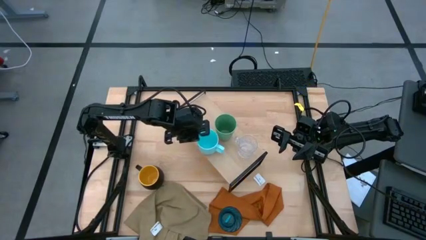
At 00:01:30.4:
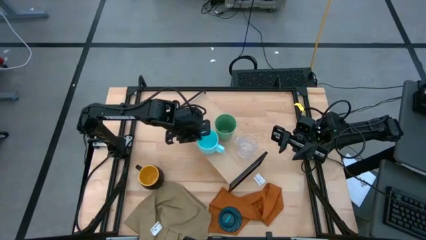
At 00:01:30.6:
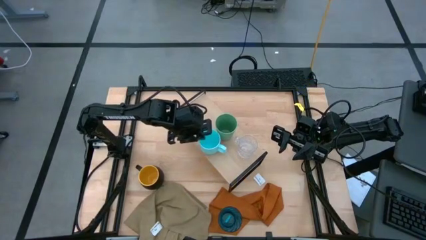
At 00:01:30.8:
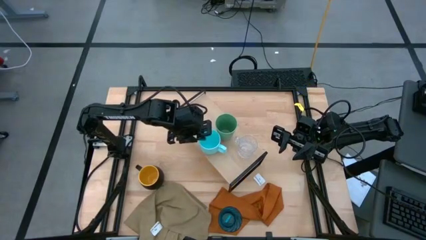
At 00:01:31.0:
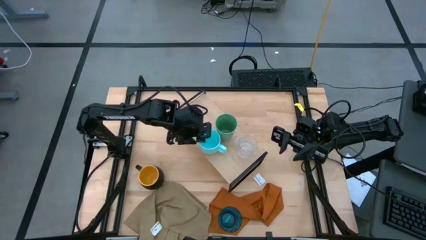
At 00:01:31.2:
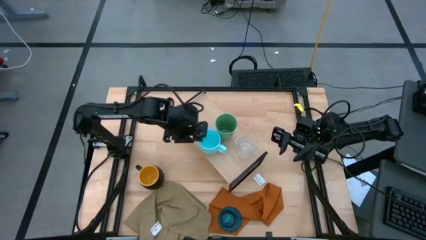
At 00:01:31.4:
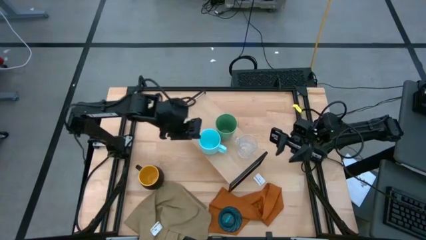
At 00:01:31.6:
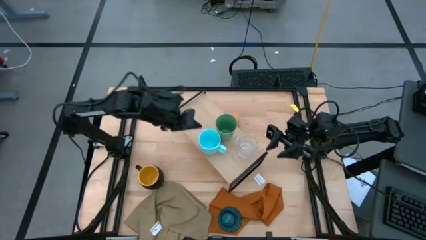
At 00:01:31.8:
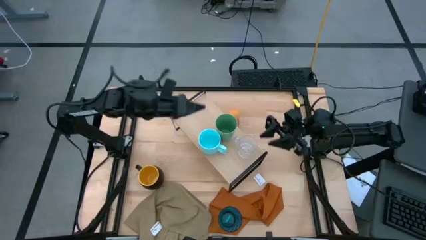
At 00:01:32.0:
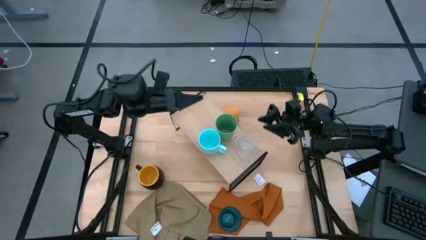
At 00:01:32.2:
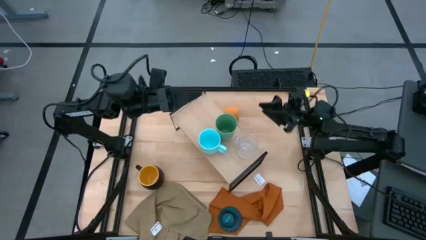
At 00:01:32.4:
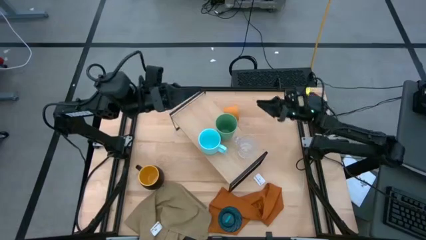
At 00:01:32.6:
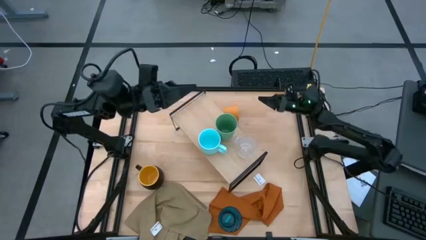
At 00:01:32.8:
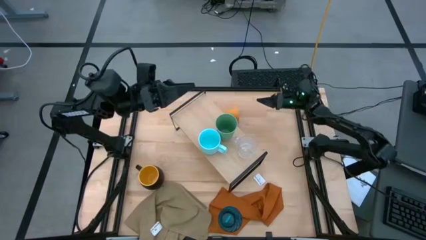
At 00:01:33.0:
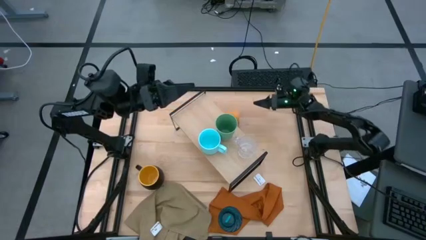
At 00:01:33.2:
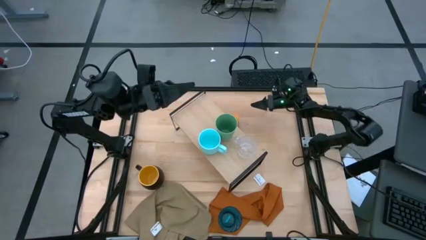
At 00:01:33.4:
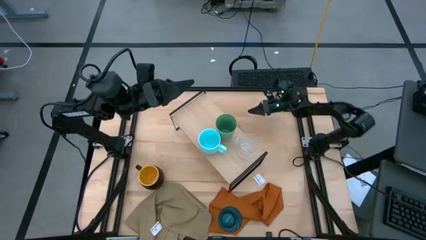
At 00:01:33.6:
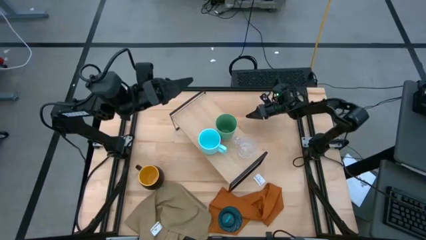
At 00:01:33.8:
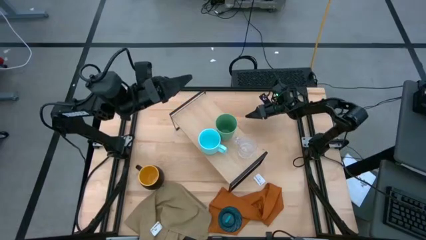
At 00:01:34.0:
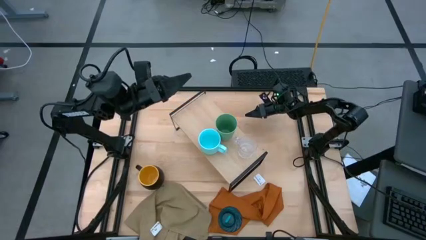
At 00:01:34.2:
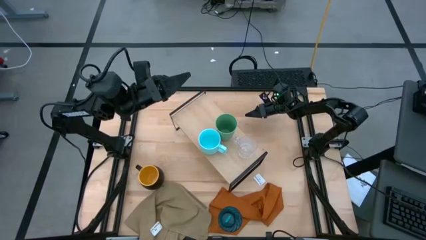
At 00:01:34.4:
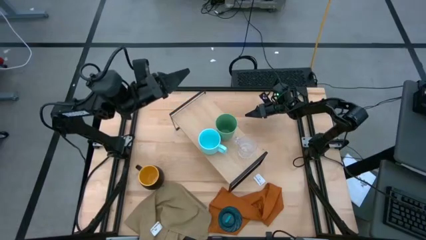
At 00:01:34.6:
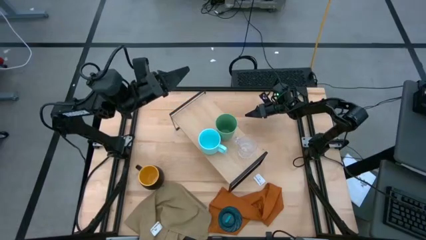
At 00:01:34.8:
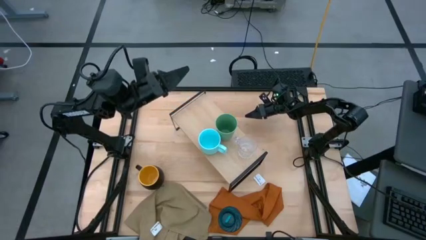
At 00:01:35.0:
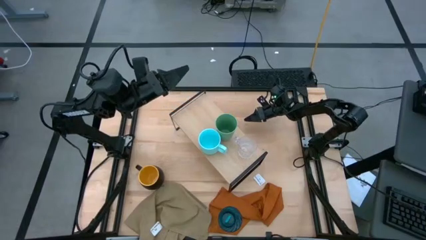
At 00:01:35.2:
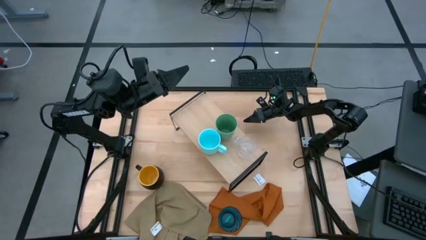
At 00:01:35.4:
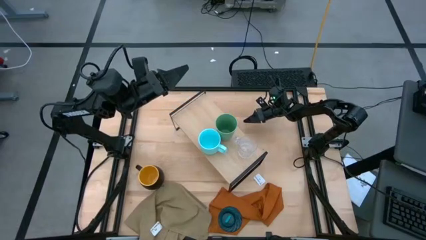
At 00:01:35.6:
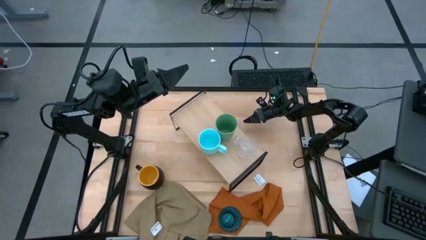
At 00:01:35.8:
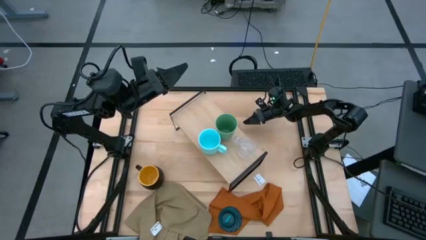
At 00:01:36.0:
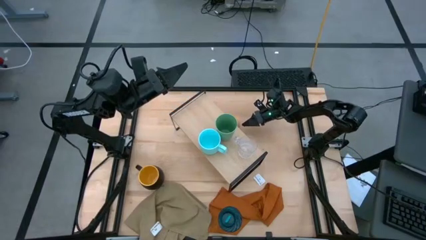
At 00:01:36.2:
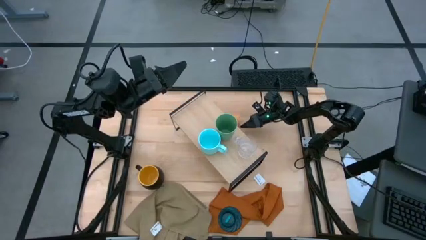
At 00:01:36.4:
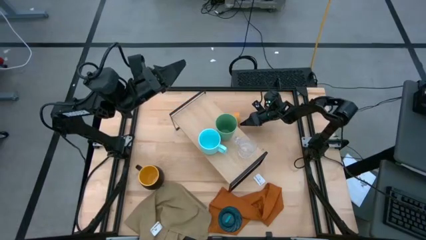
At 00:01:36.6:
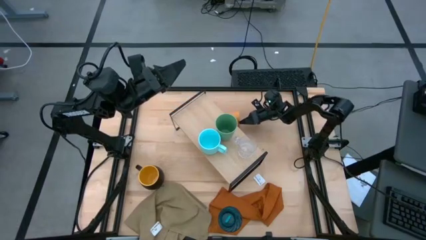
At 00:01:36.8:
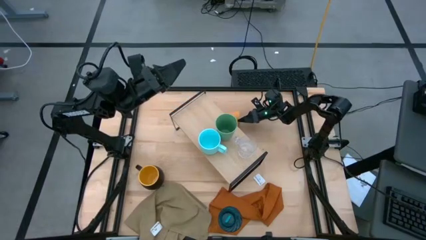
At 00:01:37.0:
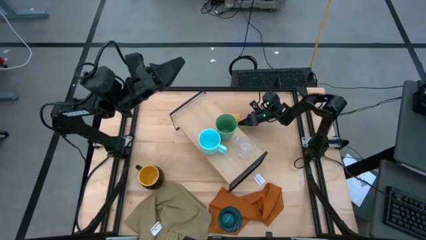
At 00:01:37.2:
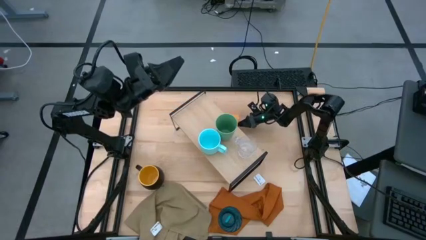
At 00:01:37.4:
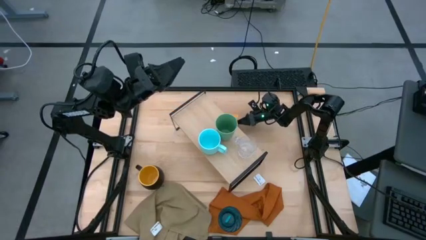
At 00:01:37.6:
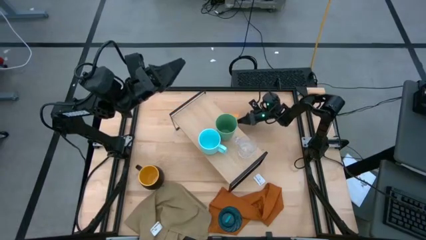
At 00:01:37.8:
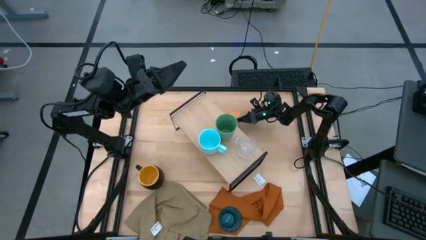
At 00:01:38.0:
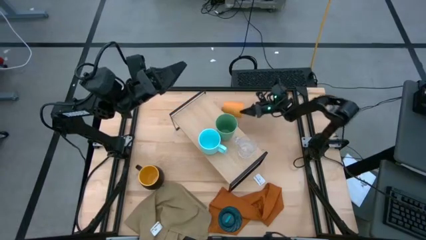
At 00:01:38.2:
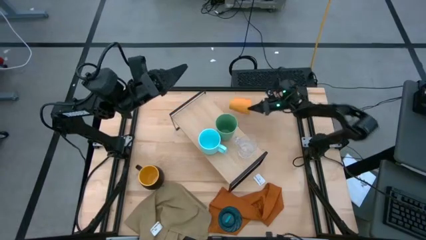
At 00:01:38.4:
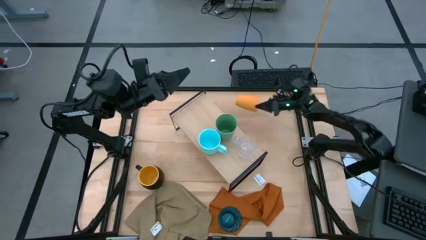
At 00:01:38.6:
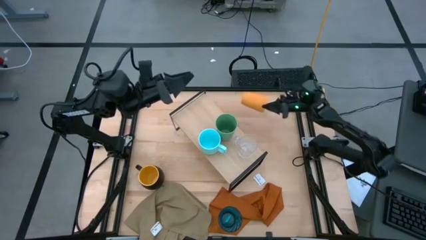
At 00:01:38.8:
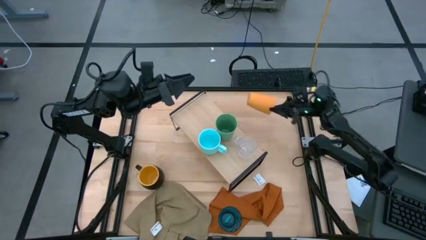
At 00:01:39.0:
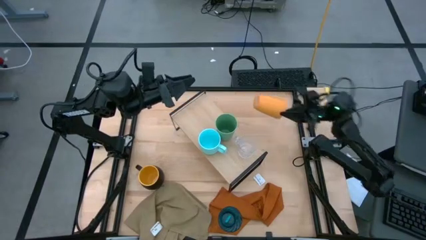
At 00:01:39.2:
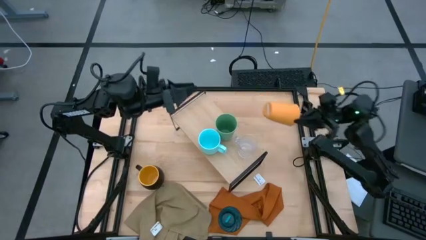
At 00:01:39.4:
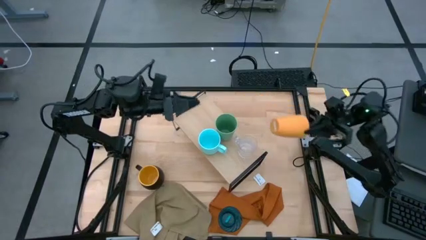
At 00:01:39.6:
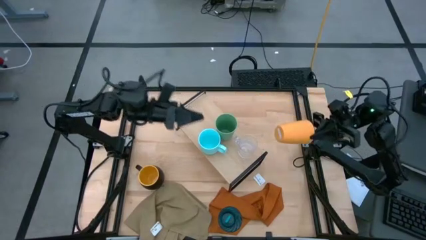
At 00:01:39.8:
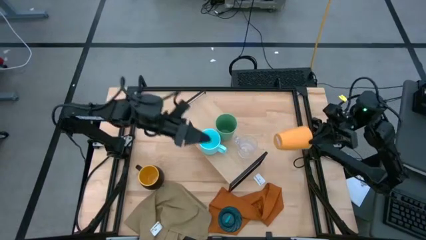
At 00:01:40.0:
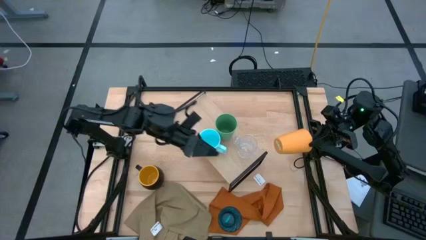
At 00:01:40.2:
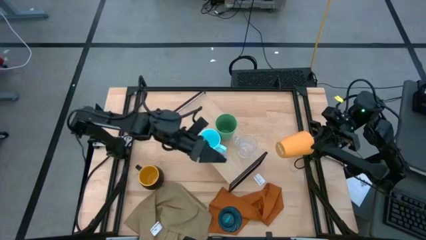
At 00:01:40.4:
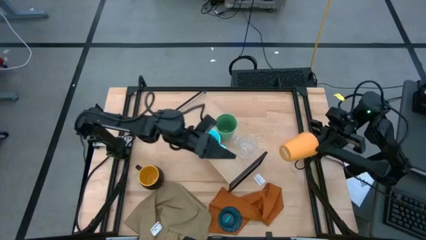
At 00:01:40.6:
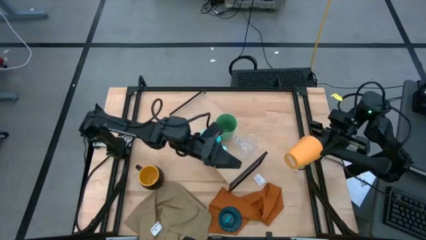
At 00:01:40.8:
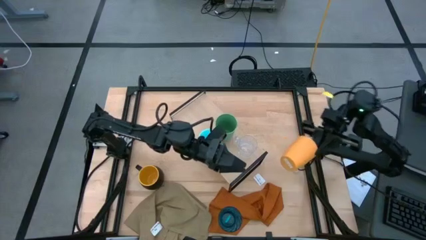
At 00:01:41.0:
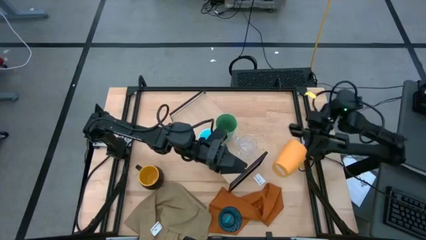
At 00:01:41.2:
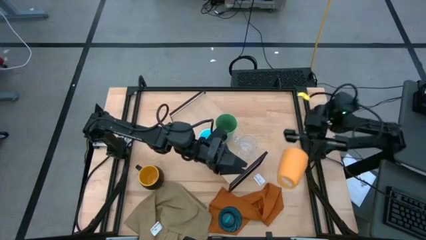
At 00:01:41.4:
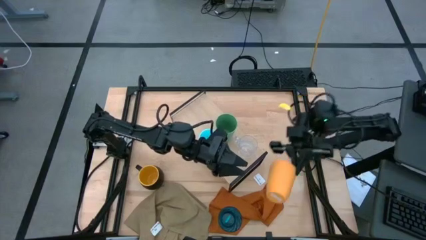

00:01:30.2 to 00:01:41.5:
Task: Stack small to large cups/mugs on shelf
Put the yellow cup on the shelf

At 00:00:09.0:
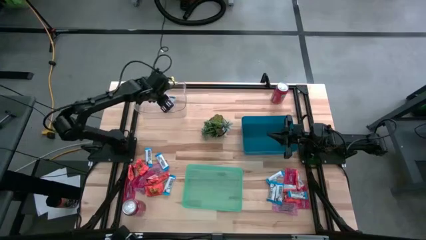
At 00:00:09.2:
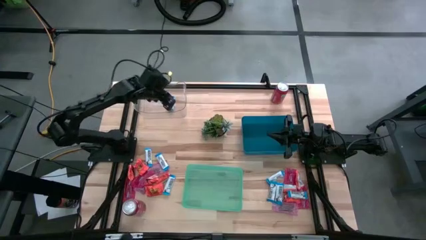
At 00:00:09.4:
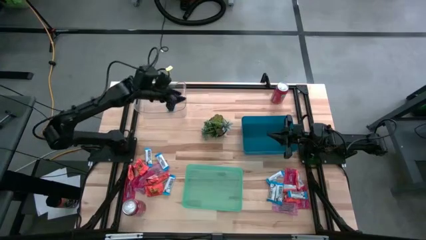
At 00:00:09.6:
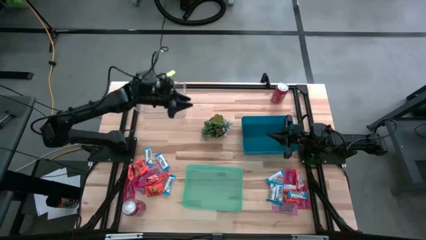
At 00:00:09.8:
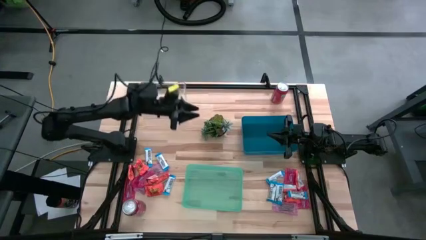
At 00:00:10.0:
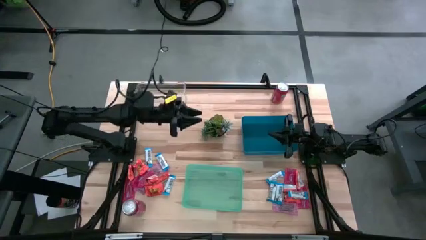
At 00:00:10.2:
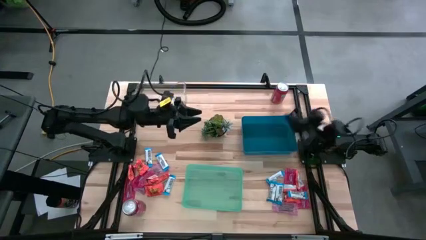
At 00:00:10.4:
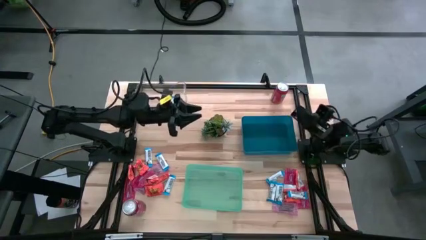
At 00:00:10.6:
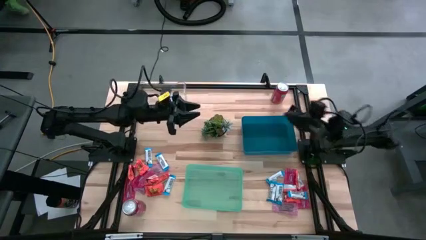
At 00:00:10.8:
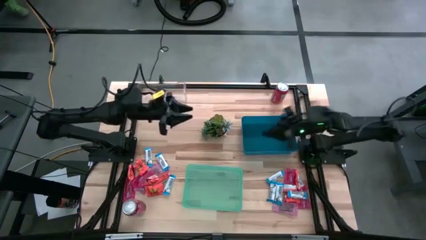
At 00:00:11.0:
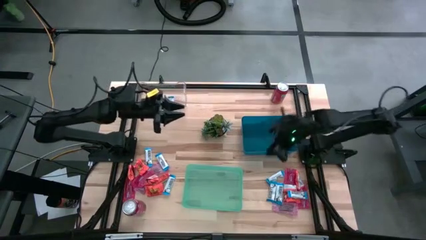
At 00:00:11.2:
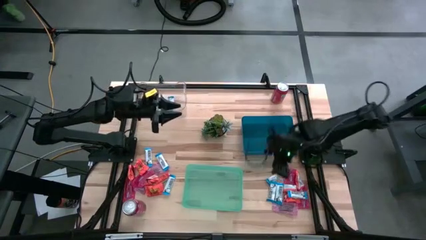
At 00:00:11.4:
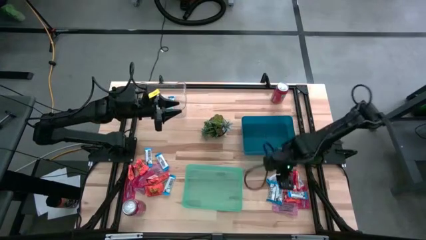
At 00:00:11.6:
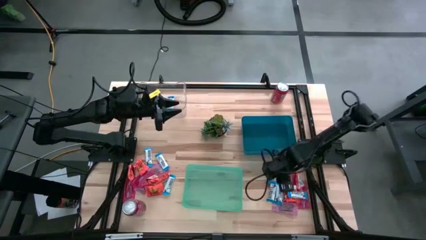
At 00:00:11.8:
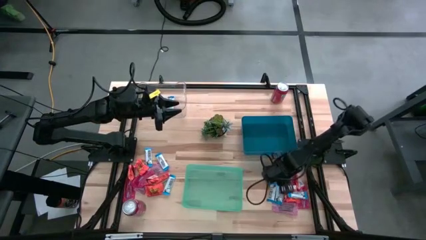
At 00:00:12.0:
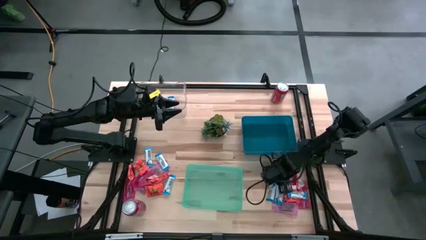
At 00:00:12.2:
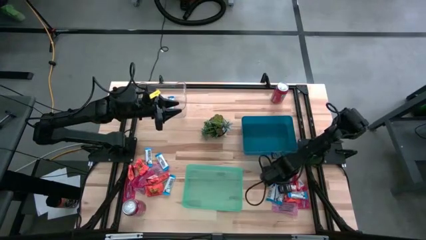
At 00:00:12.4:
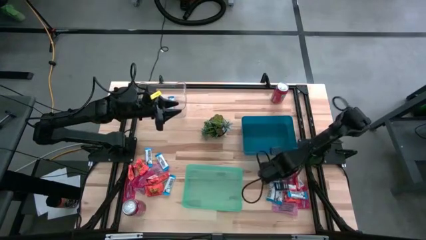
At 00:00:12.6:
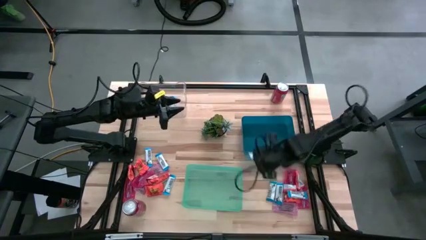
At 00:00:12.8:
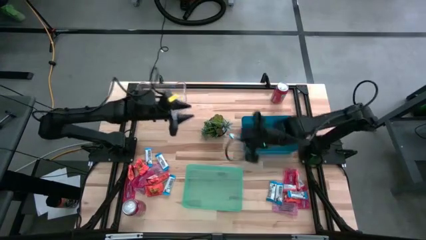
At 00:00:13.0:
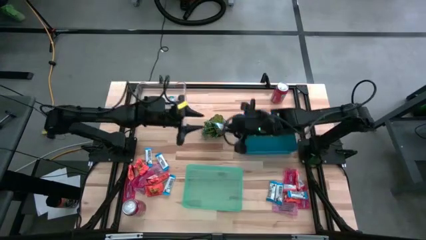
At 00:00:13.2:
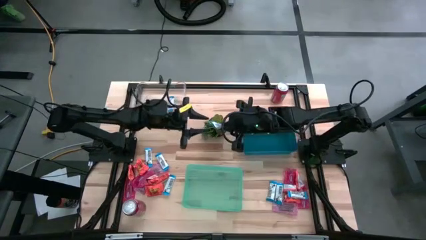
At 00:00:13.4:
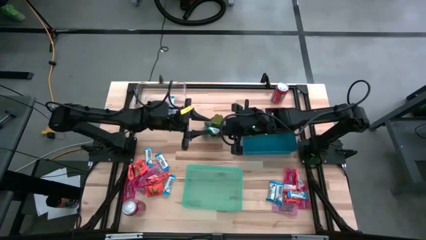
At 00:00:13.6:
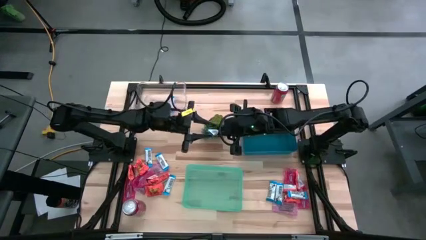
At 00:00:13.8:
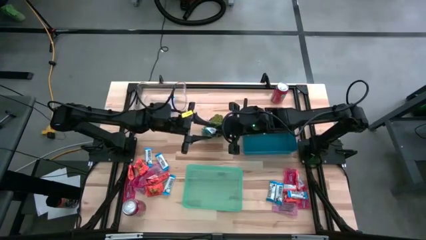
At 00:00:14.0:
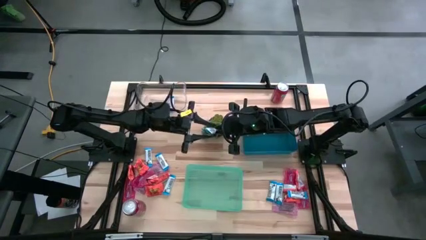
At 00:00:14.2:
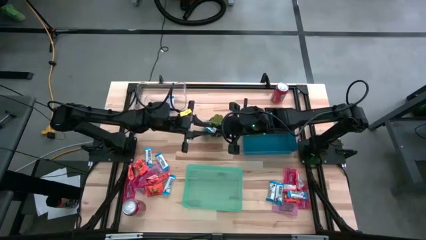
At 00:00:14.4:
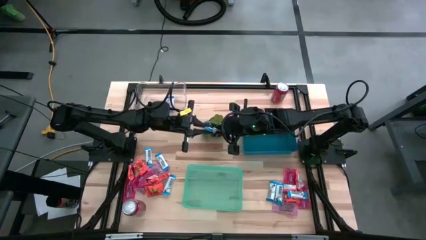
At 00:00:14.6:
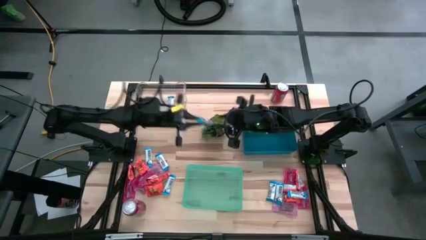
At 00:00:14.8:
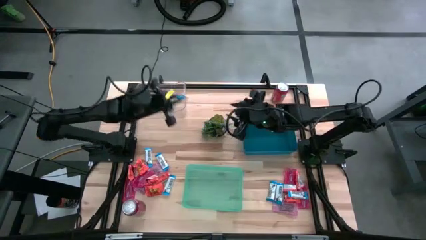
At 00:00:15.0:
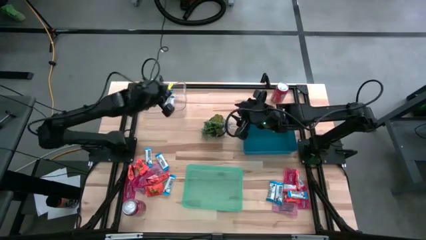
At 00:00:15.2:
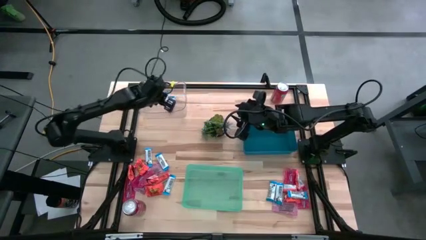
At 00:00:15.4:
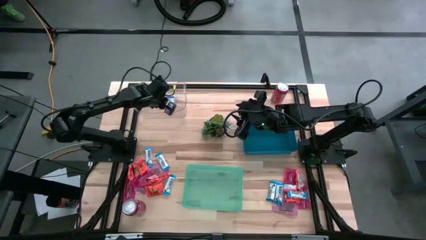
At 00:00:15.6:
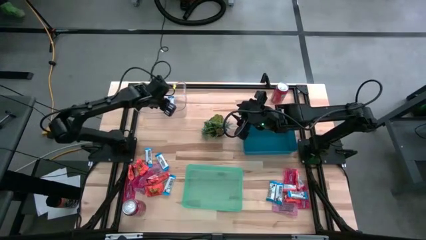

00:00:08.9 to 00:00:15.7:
Task: Sort candy
Put the white chocolate bar into the transparent bin
